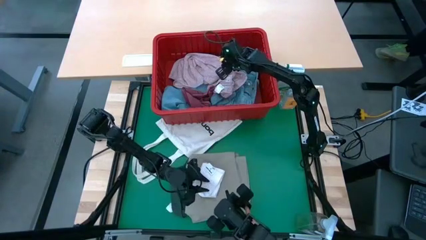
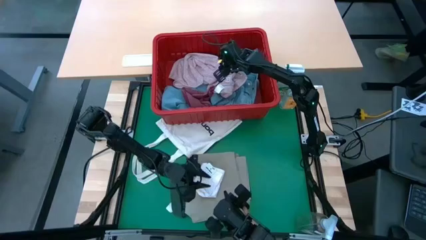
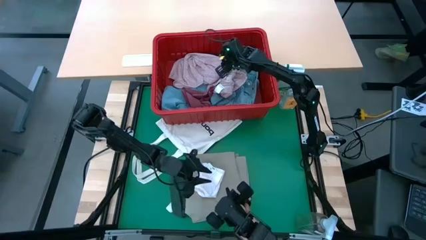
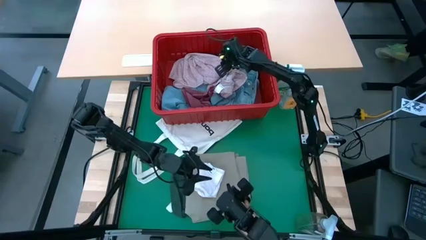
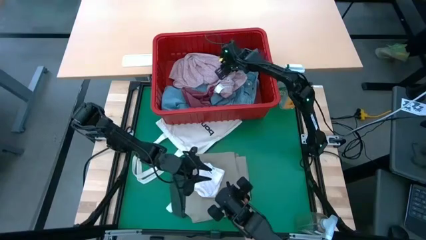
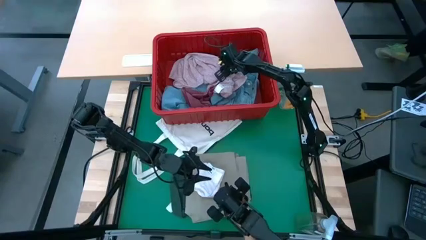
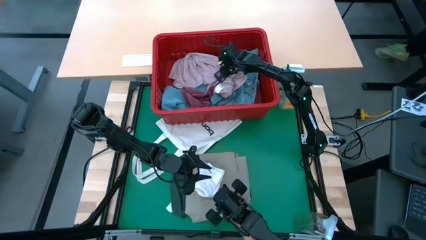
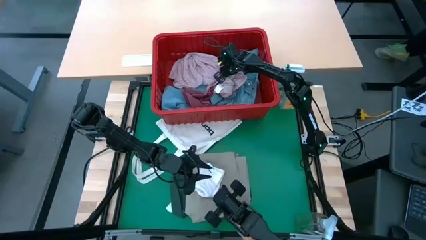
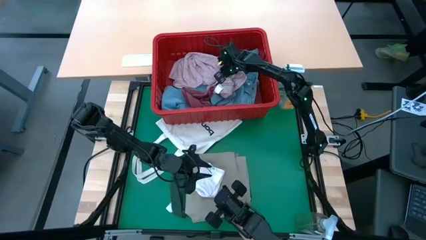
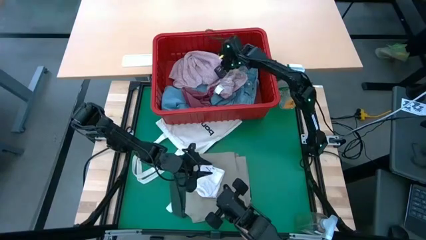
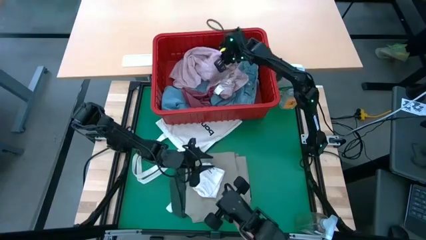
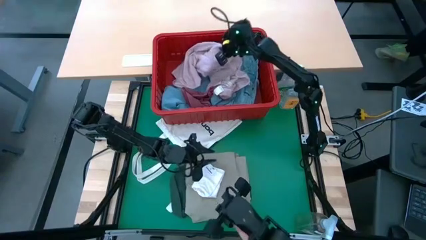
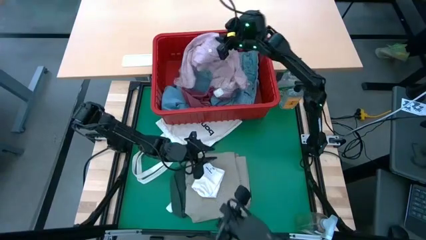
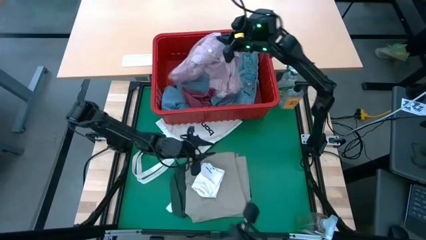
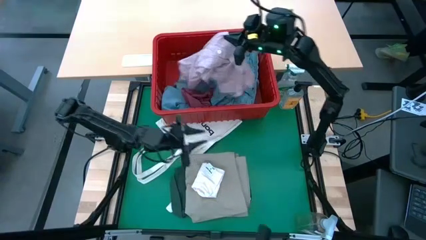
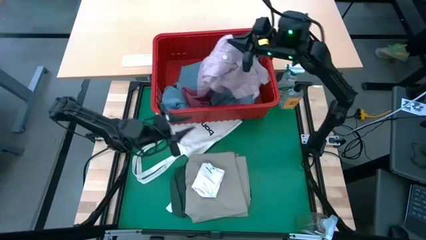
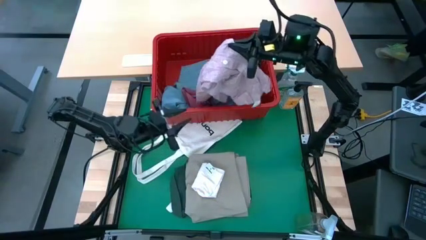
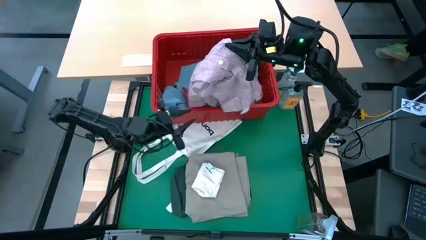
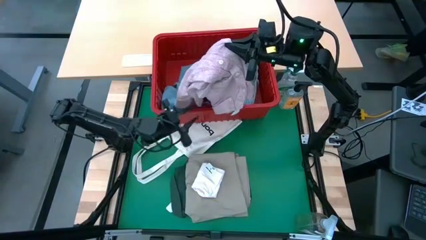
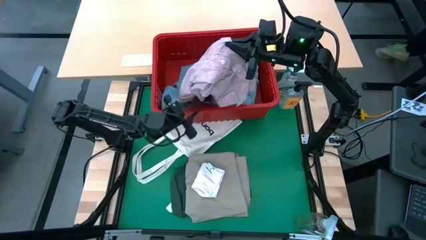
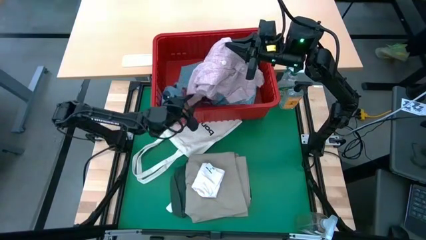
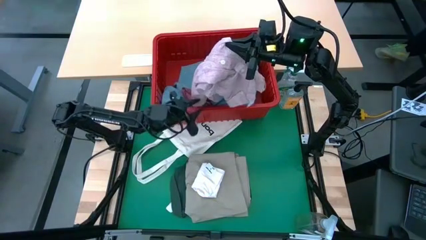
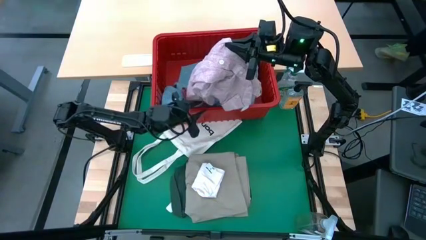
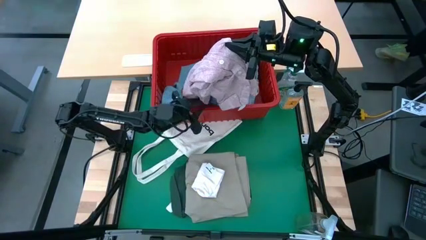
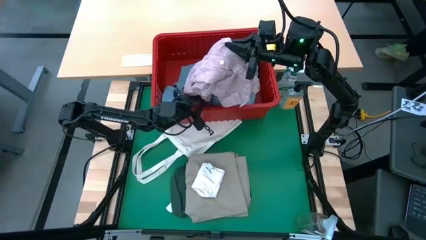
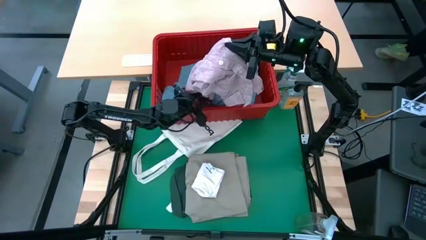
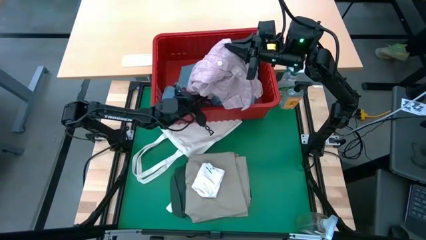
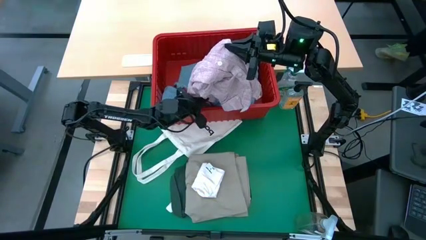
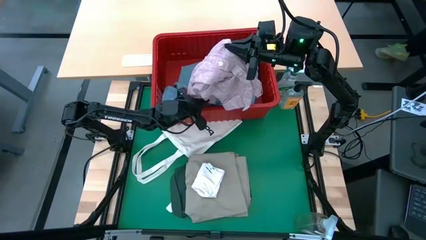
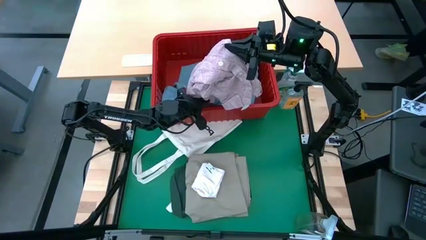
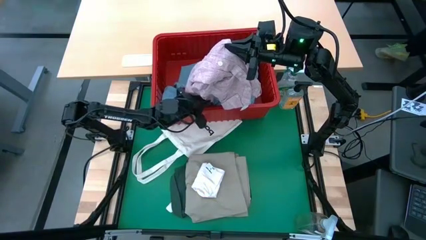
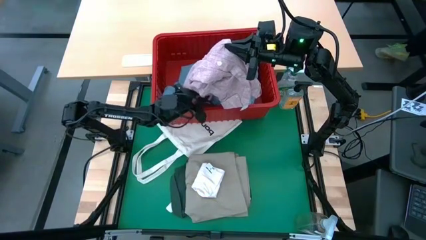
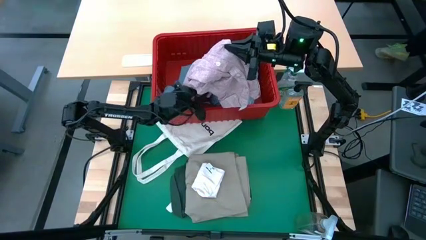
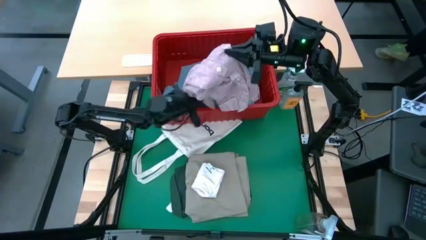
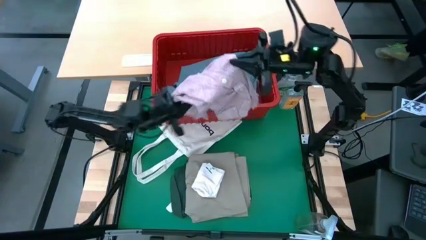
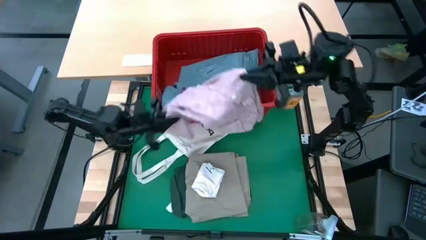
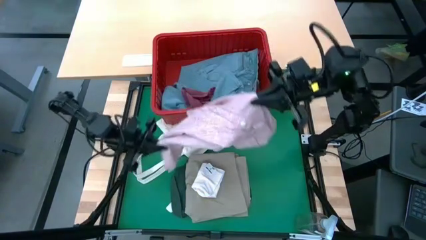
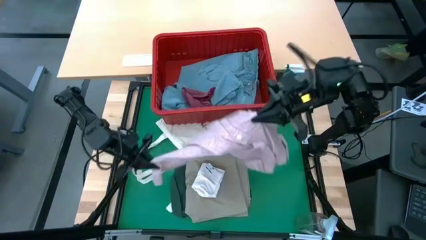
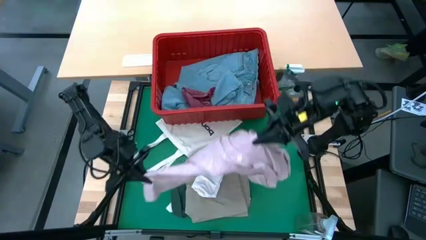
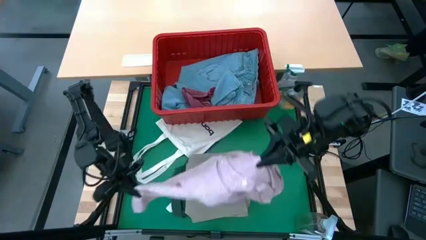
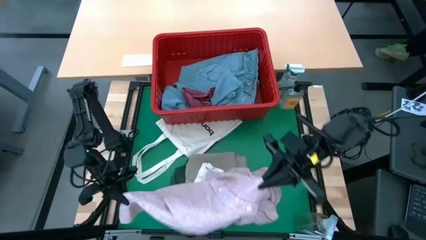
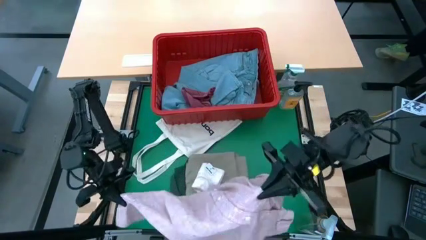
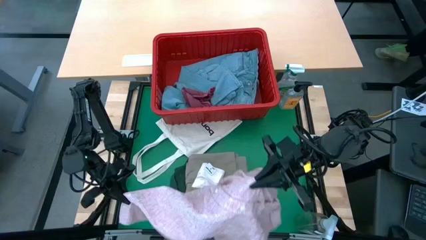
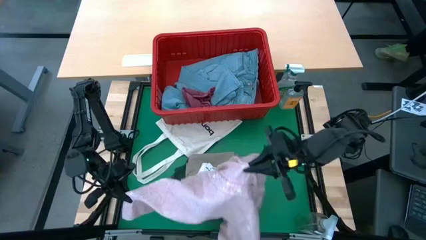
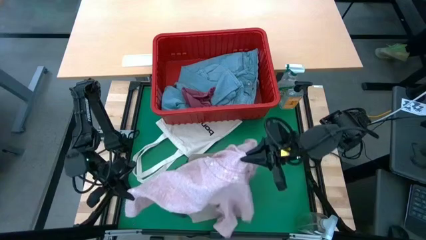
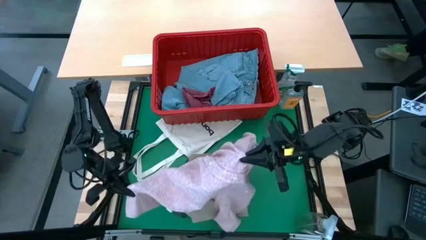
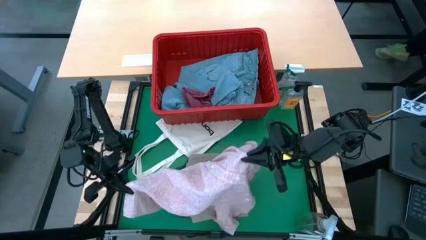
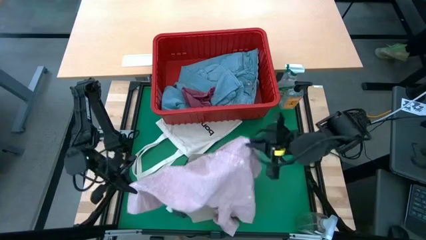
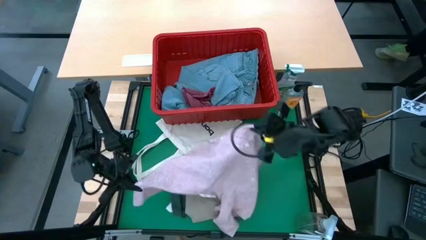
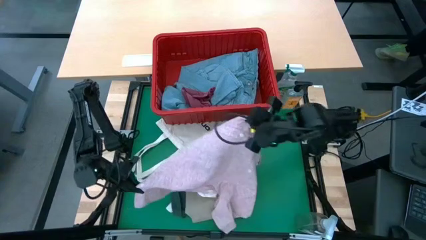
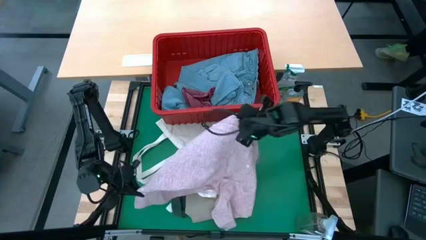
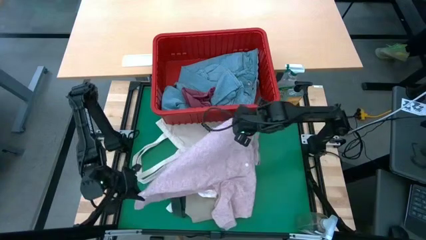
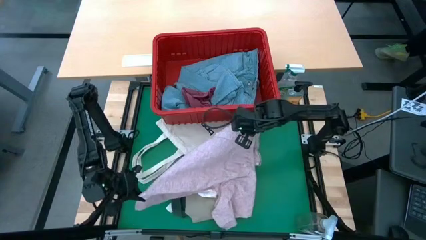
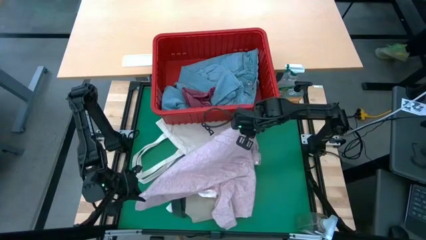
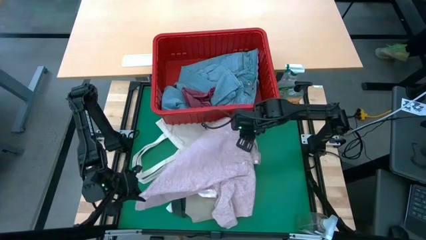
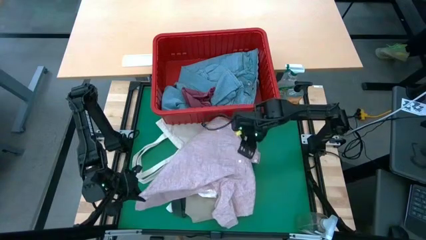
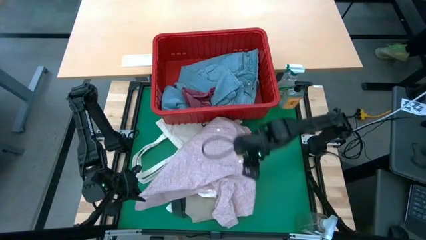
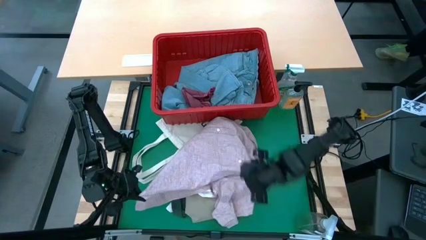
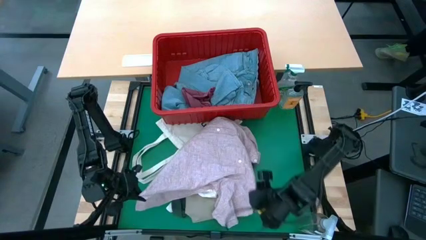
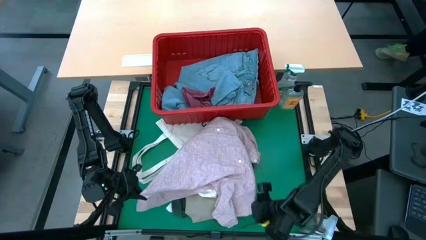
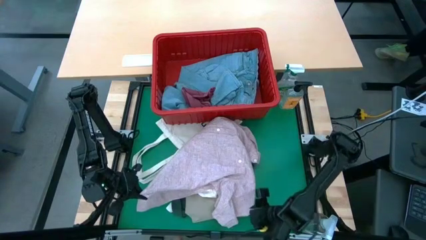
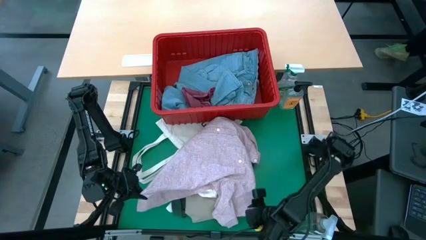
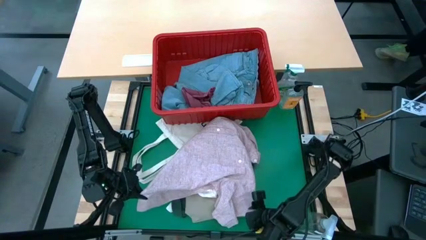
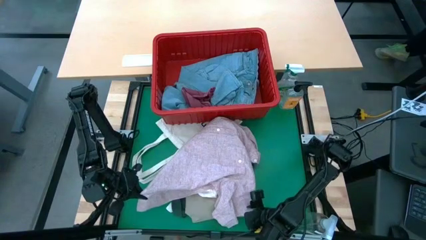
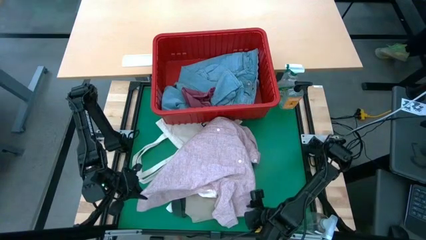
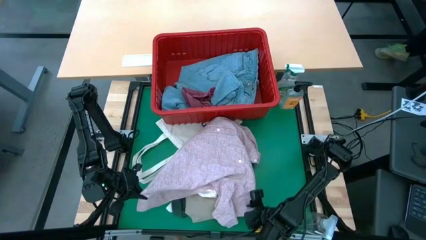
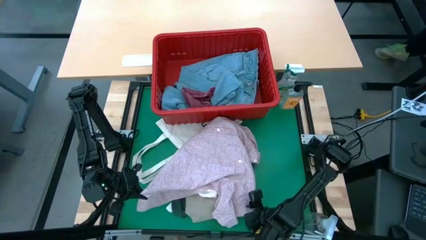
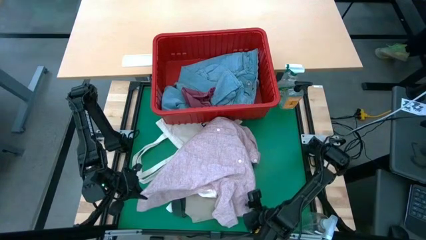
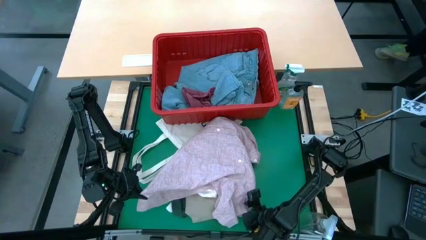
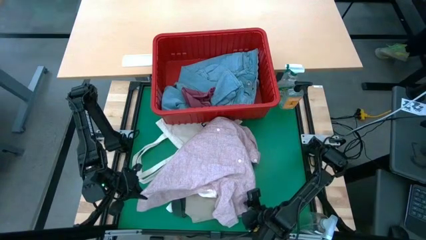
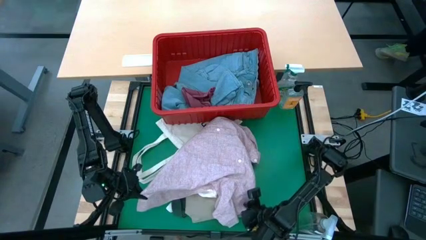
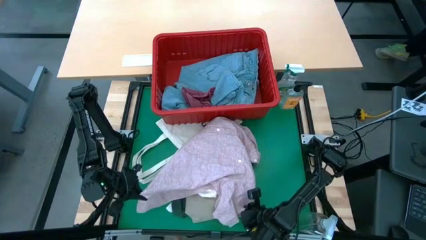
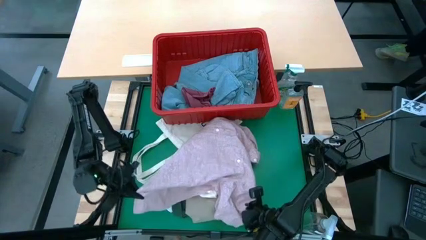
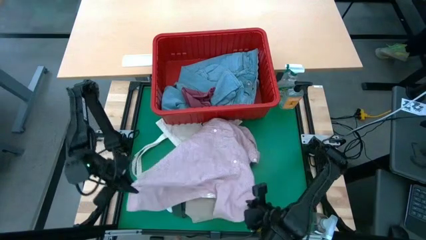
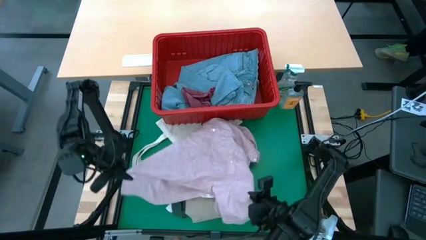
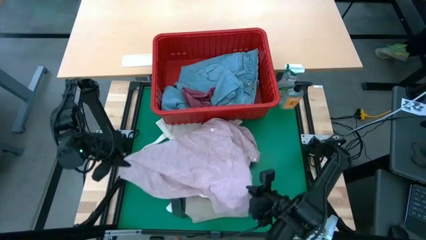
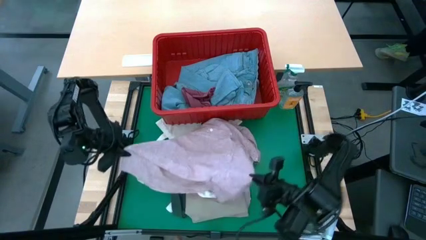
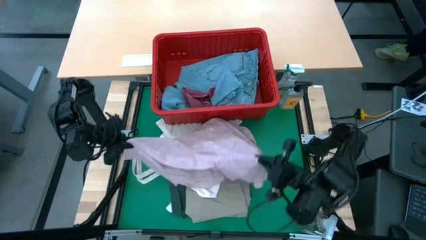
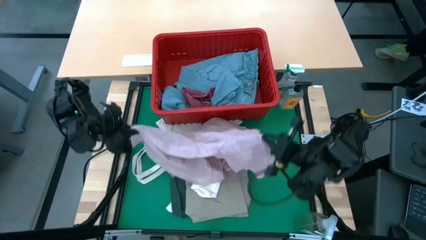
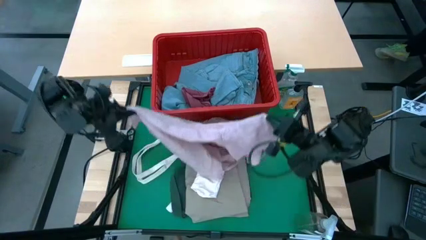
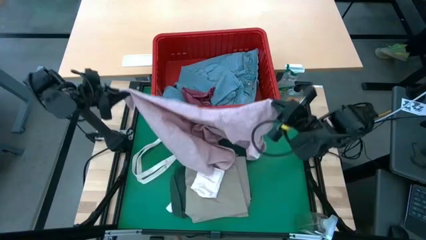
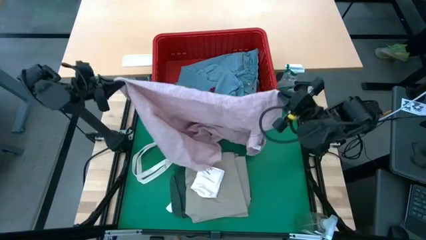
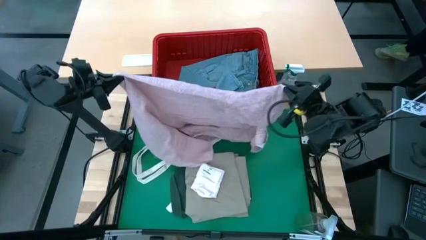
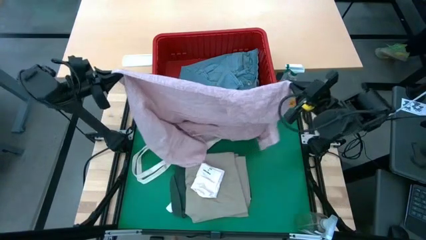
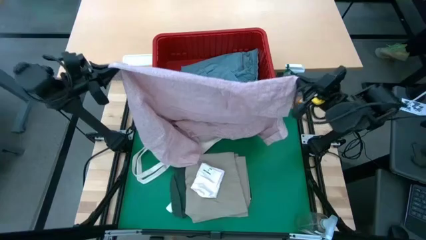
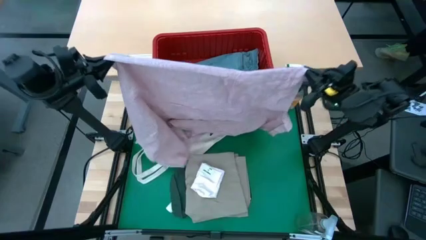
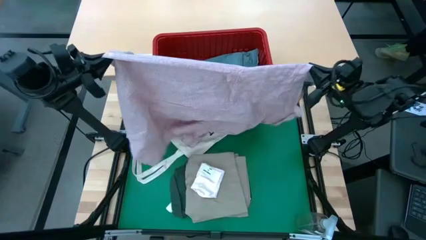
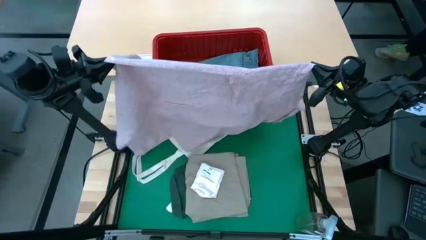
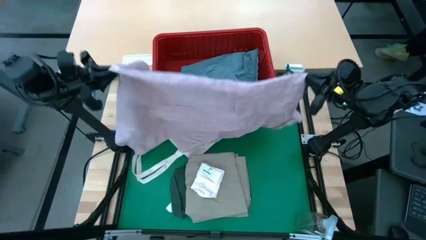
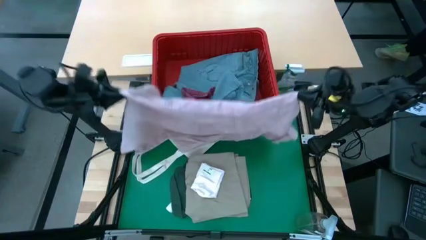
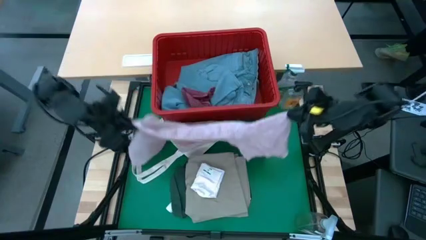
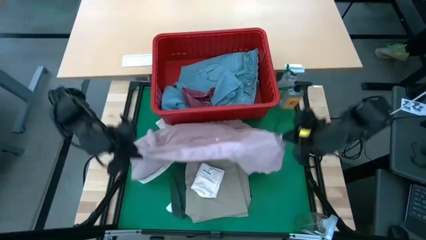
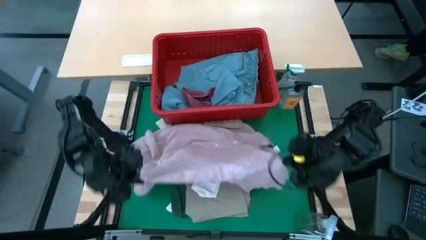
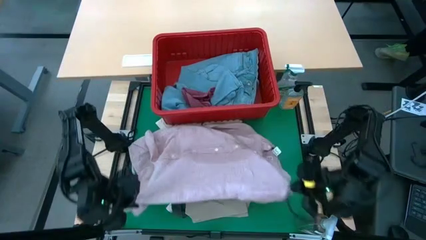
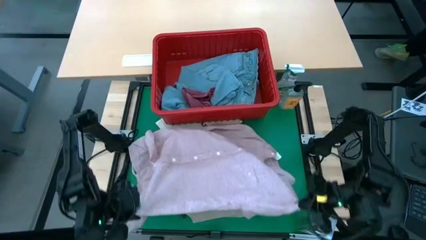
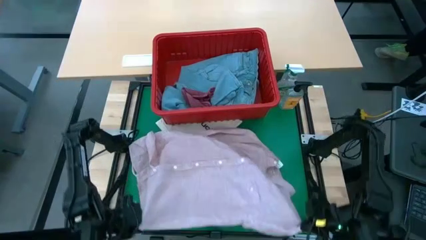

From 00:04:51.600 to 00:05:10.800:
Task: Fold laundry
Fold the pink shirt
